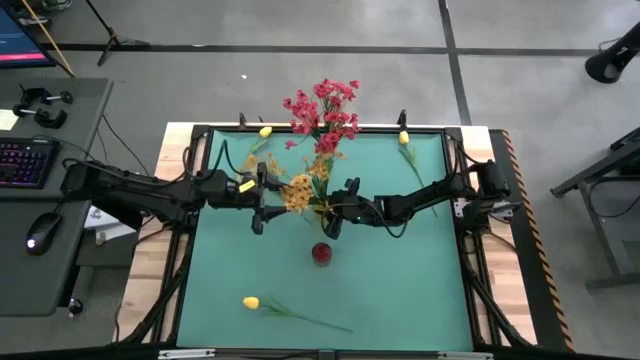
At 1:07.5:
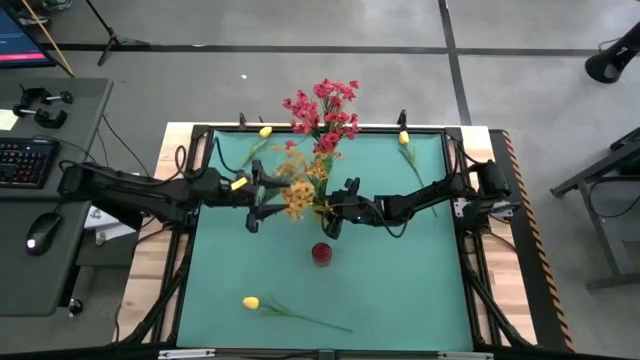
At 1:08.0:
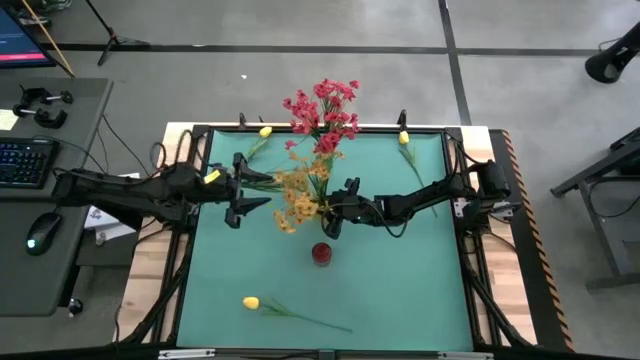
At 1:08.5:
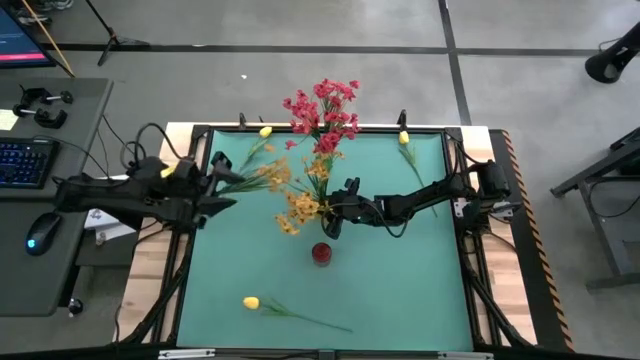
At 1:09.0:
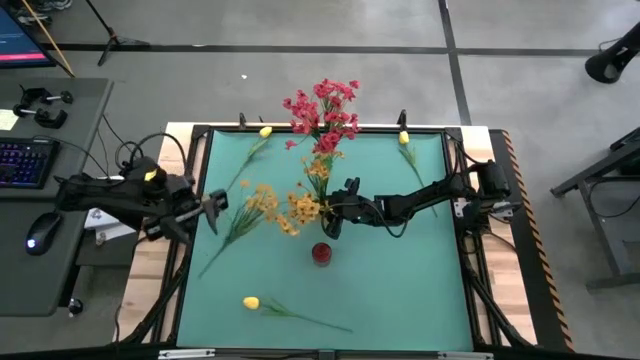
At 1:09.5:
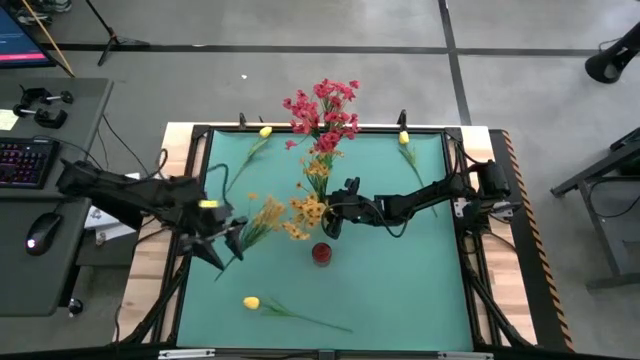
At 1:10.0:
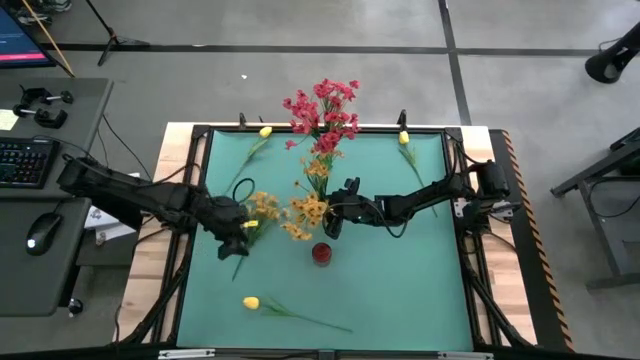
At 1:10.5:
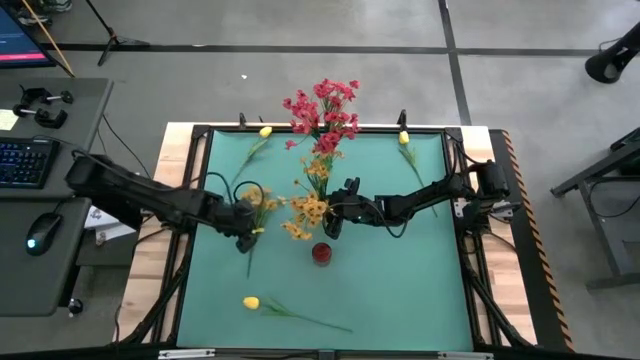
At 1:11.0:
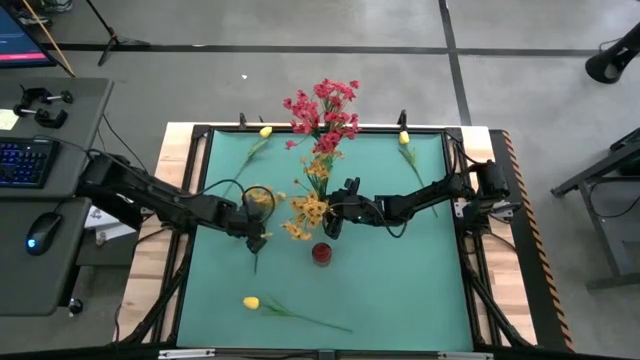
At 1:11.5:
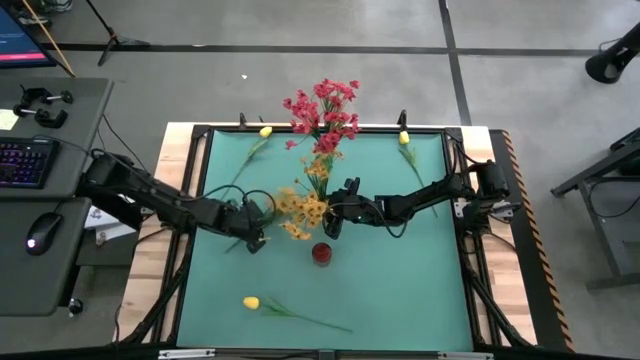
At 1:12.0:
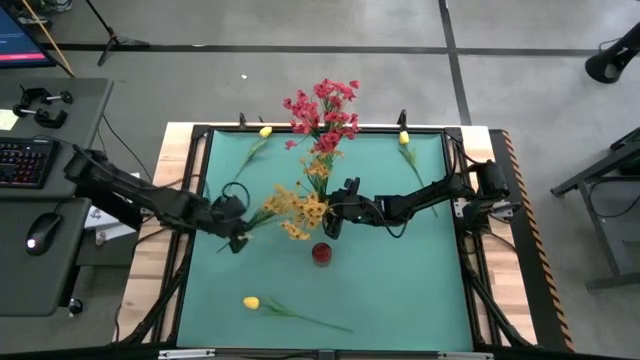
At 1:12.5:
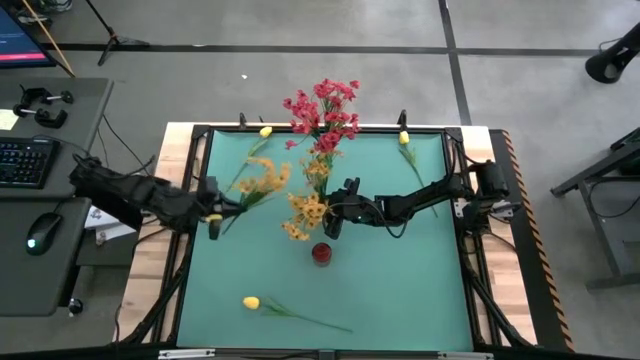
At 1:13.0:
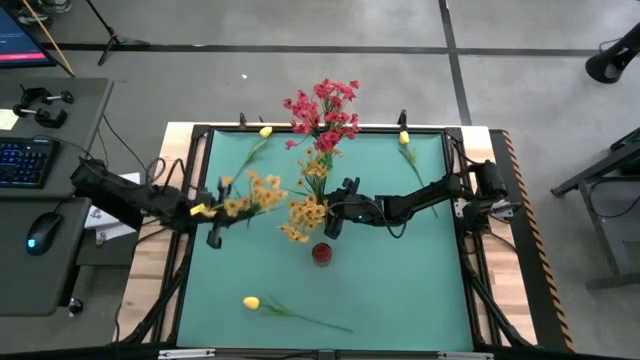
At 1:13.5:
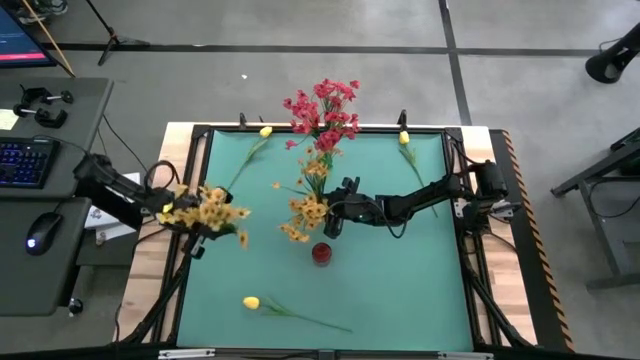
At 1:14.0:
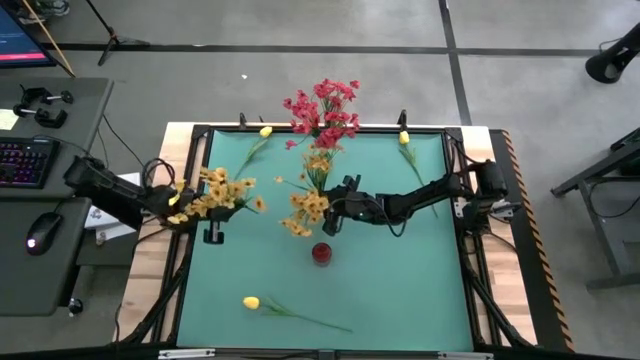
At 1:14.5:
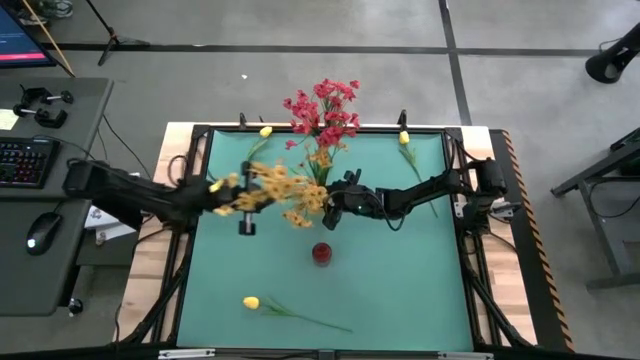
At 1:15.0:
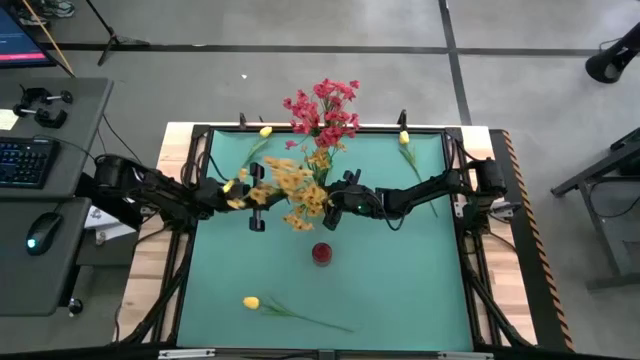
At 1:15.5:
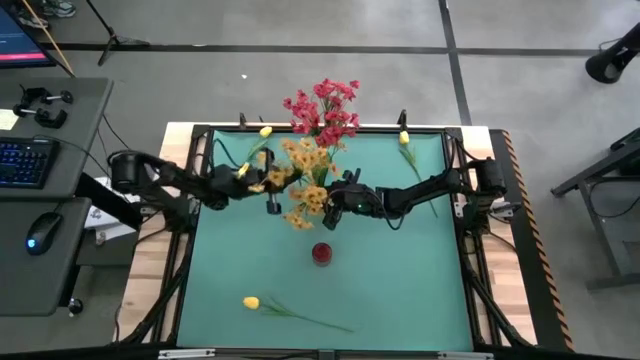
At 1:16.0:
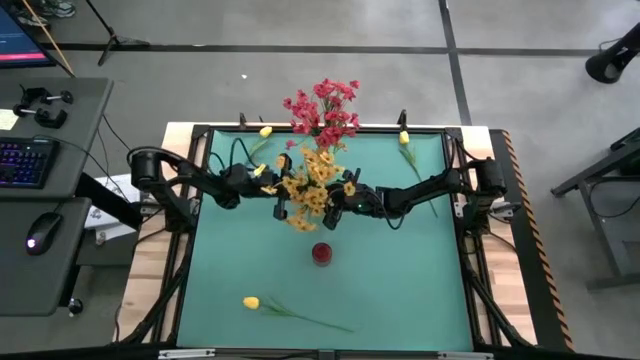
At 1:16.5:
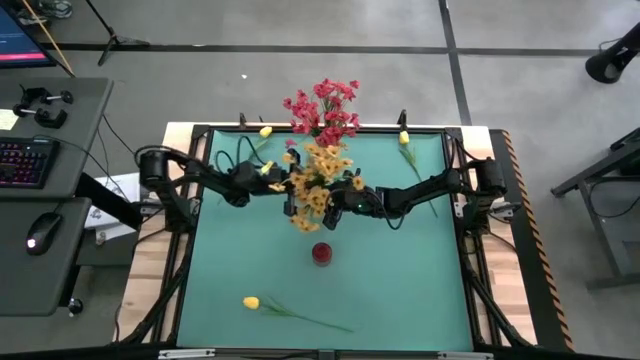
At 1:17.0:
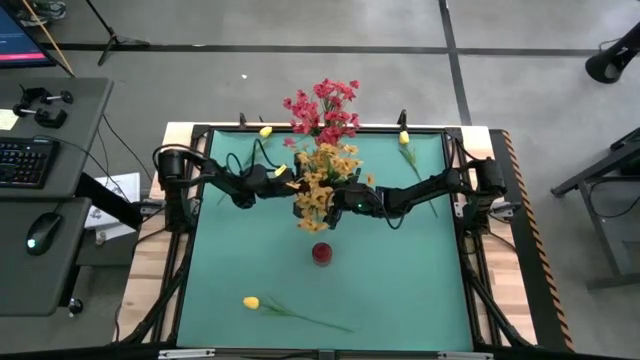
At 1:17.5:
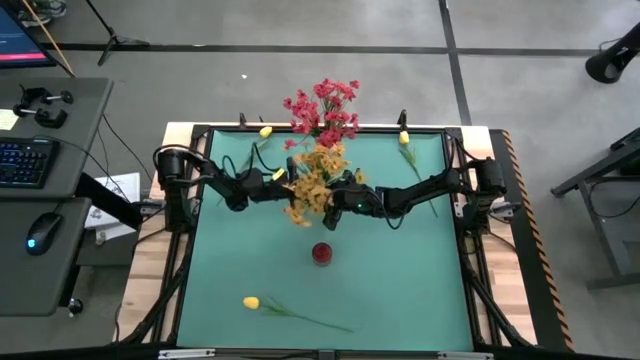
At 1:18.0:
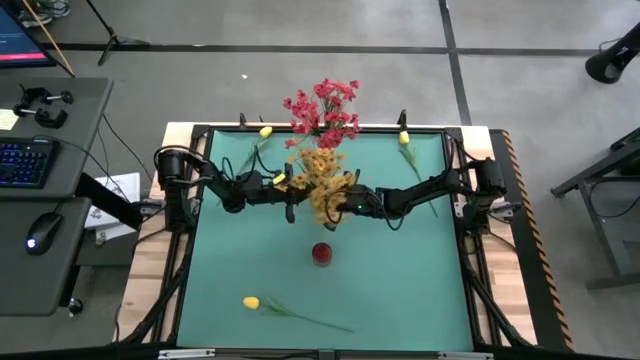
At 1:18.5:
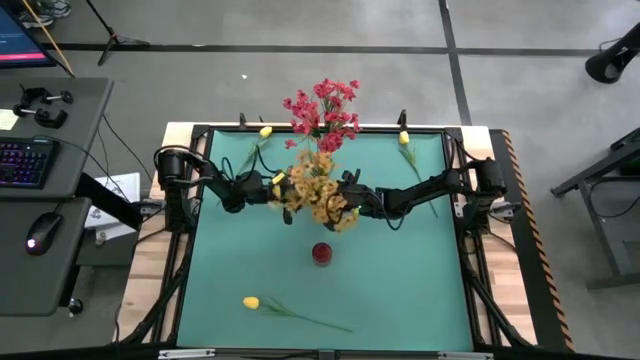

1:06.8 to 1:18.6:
Task: Sort flowers into vase by color
Put the yellow flowers into the yellow vase

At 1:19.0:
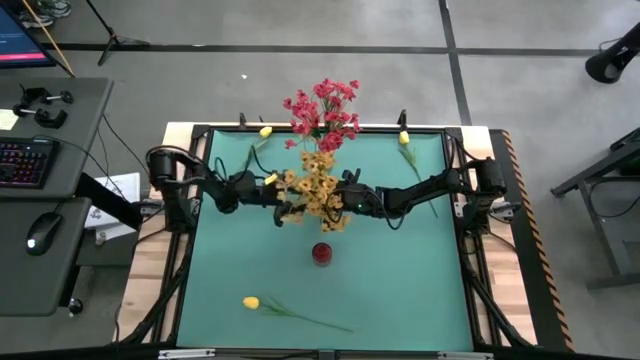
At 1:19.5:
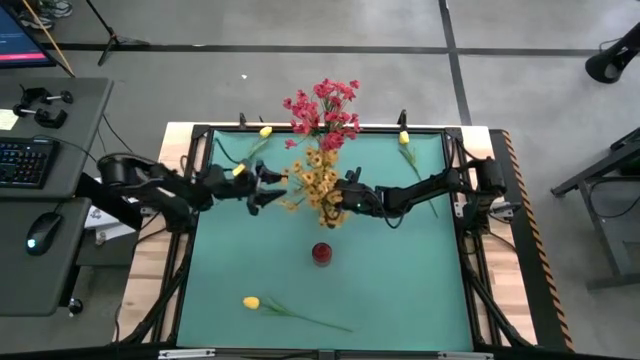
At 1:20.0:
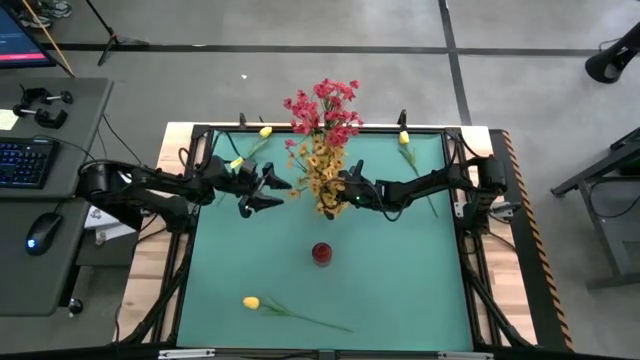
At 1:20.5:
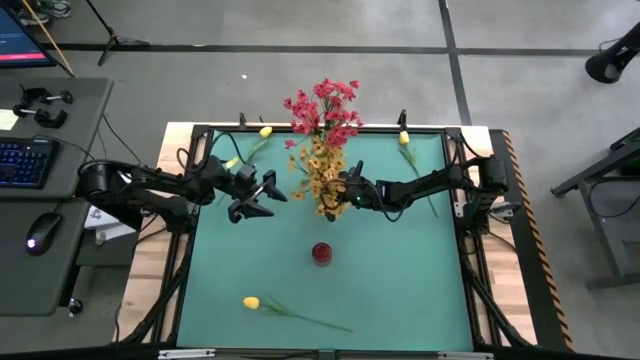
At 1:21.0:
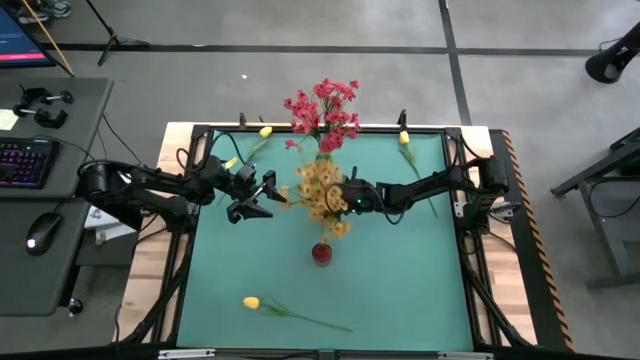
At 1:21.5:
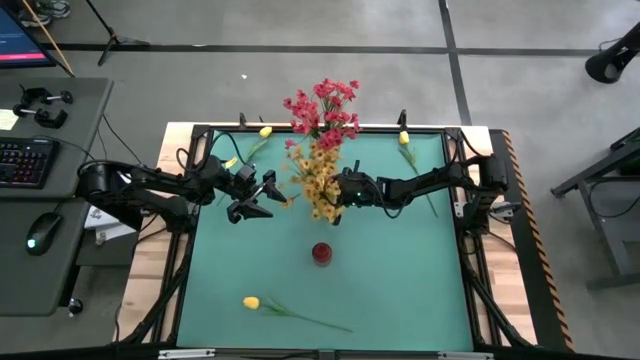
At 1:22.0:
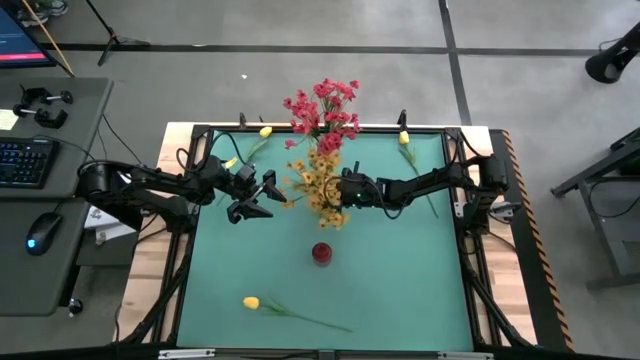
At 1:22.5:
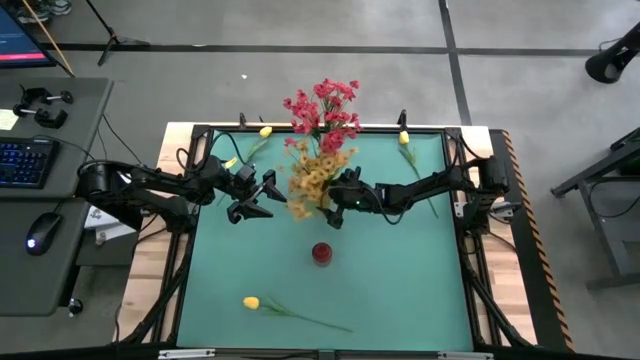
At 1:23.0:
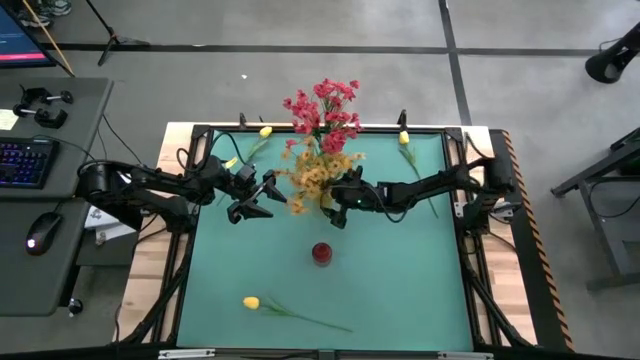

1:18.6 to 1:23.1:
Adjust the yellow vase

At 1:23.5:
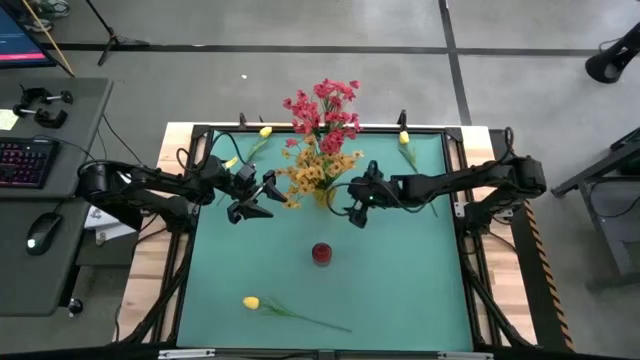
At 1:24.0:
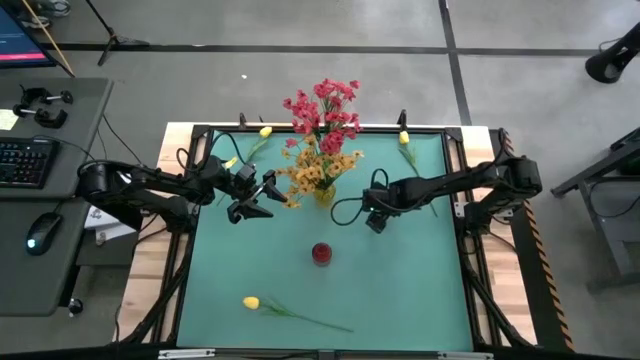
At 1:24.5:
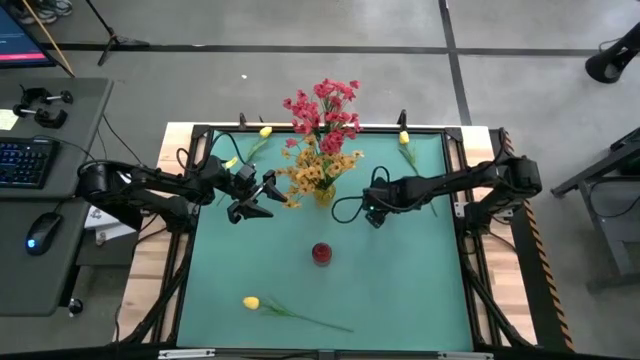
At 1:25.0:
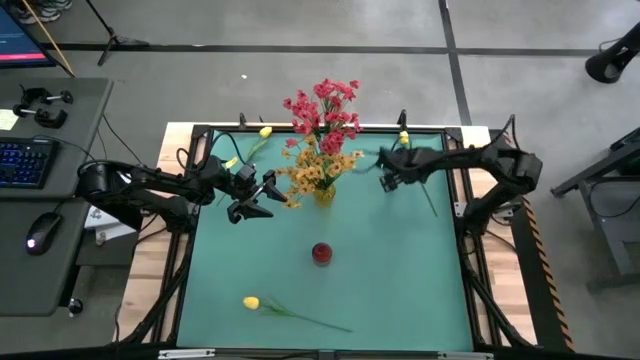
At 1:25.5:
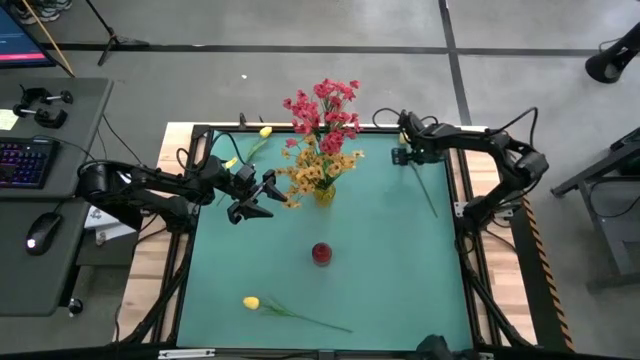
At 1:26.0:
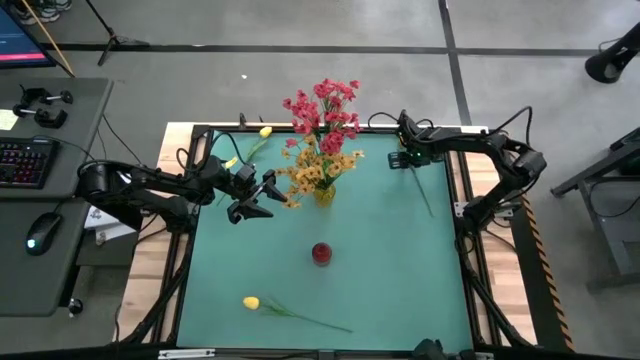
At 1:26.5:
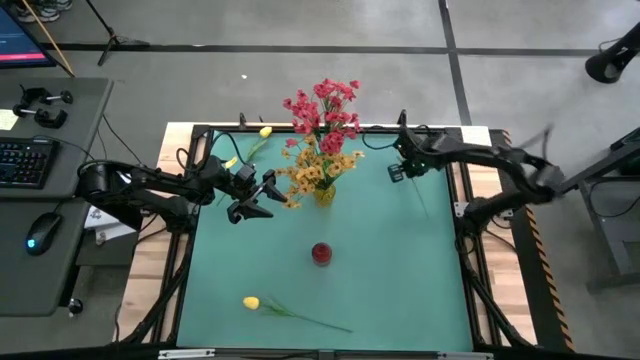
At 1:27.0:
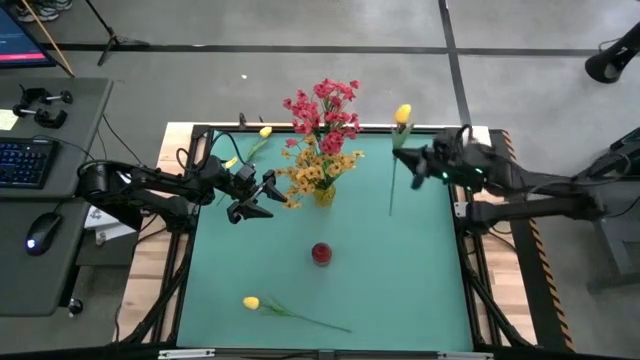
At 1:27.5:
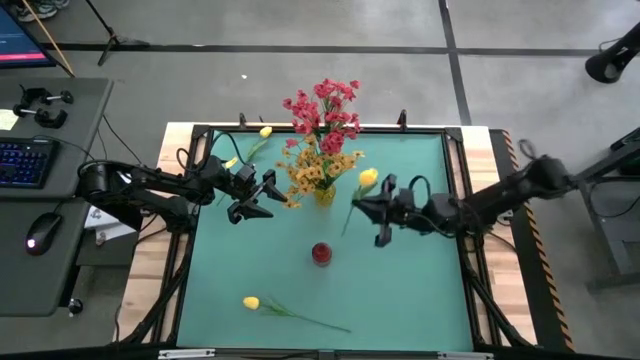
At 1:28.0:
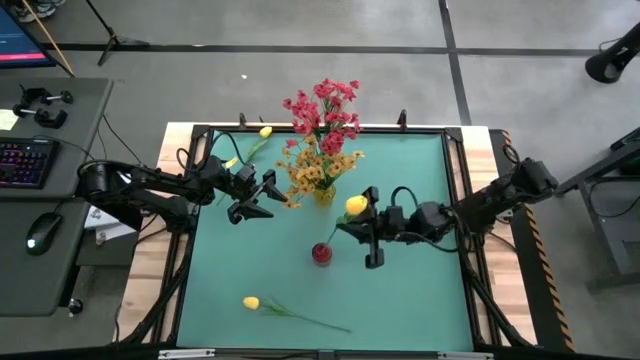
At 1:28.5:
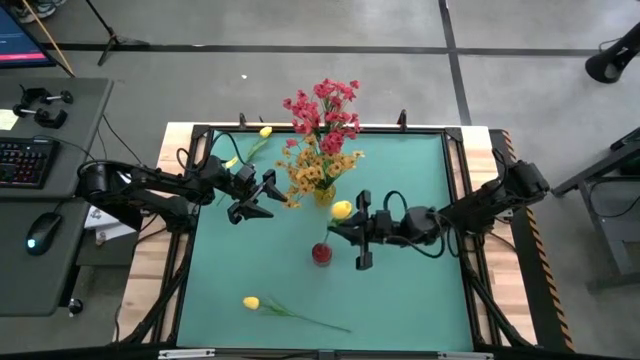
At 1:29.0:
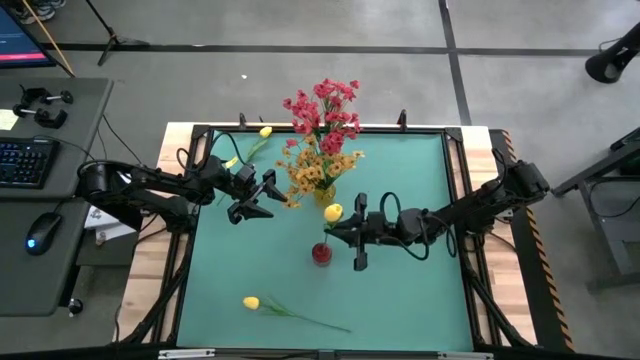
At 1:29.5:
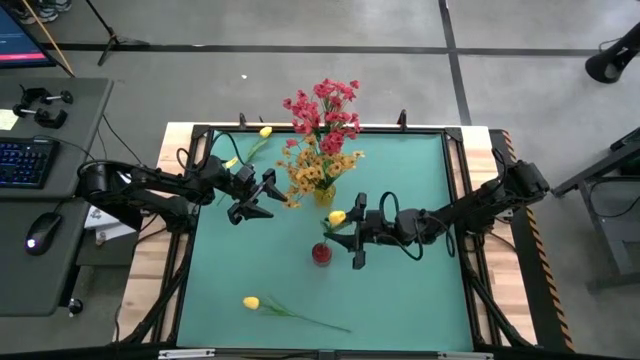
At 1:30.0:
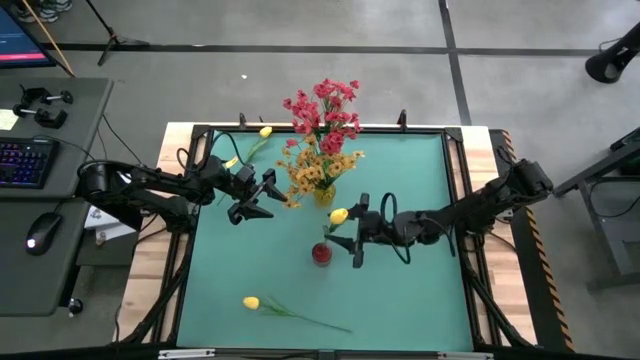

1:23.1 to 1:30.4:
Put the top right yellow tulip into the red vase
